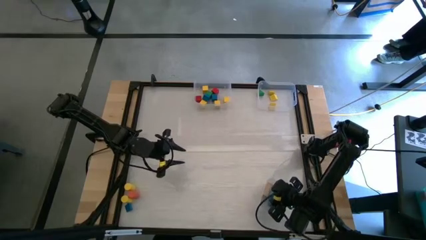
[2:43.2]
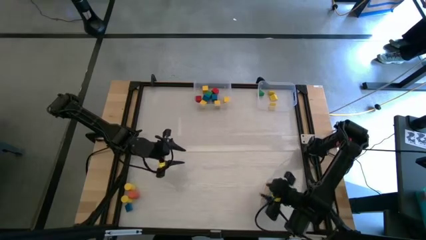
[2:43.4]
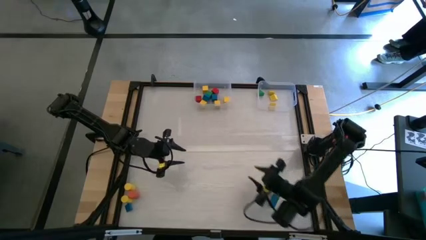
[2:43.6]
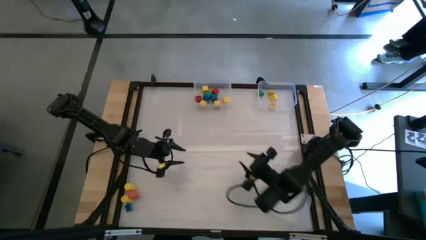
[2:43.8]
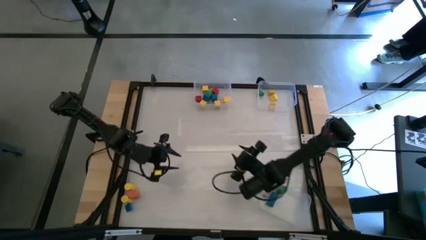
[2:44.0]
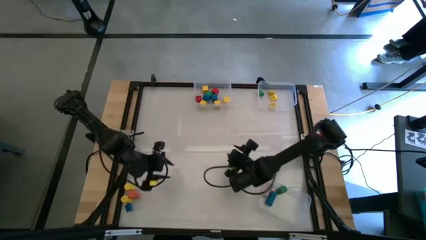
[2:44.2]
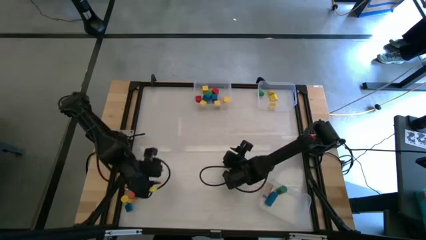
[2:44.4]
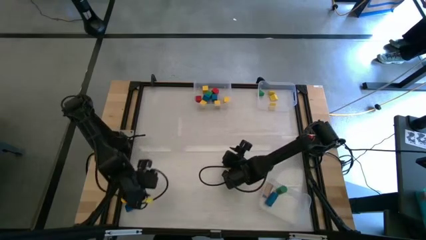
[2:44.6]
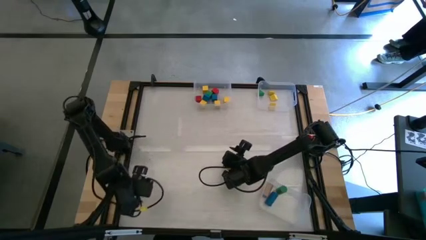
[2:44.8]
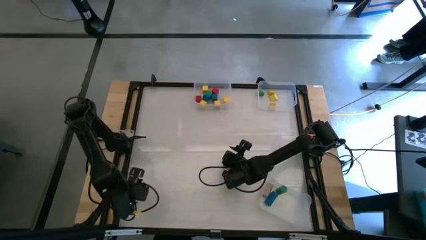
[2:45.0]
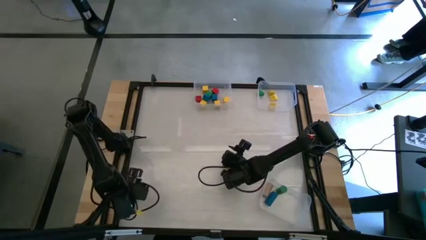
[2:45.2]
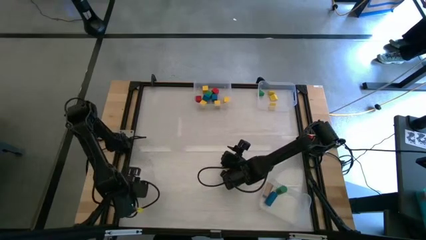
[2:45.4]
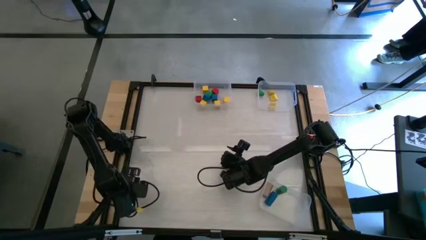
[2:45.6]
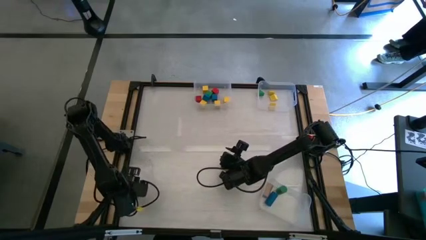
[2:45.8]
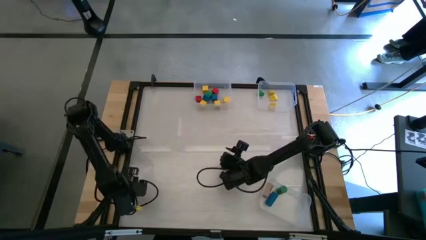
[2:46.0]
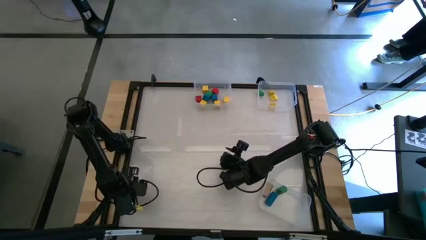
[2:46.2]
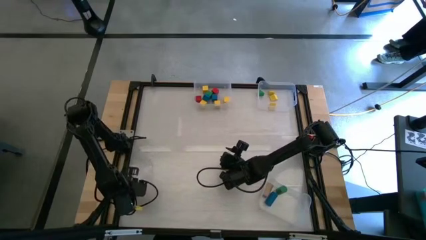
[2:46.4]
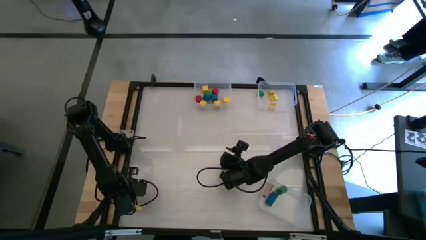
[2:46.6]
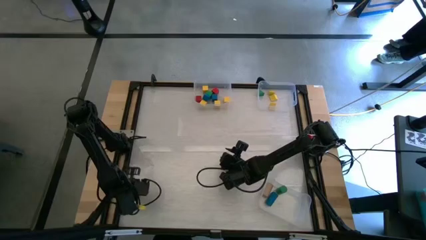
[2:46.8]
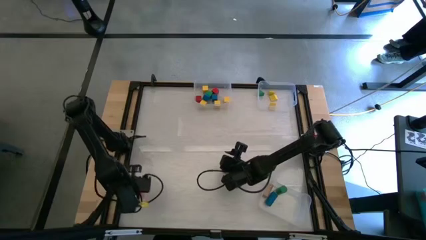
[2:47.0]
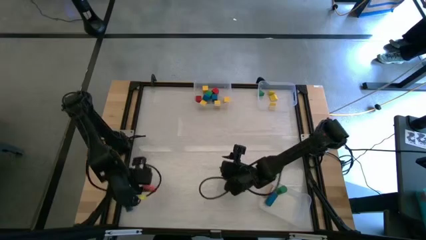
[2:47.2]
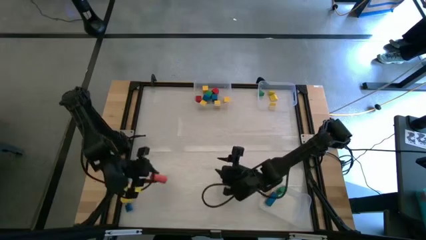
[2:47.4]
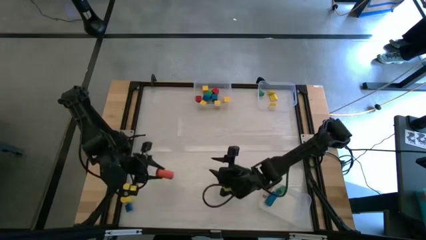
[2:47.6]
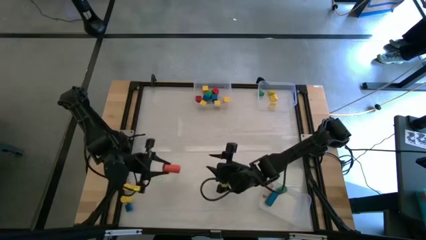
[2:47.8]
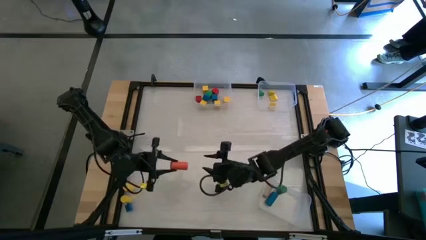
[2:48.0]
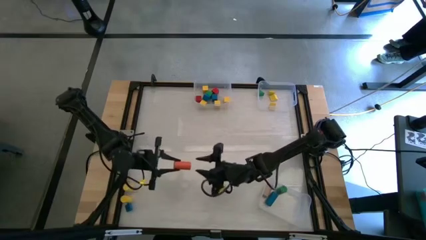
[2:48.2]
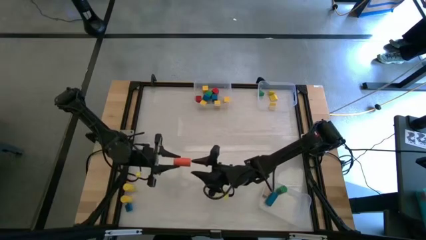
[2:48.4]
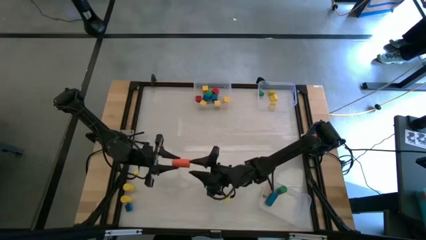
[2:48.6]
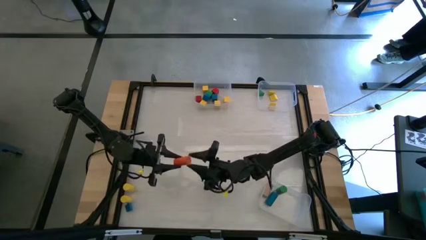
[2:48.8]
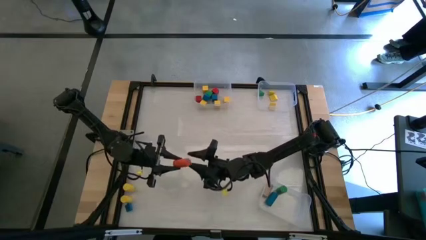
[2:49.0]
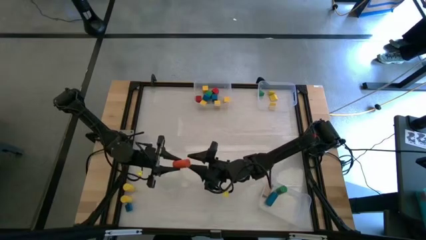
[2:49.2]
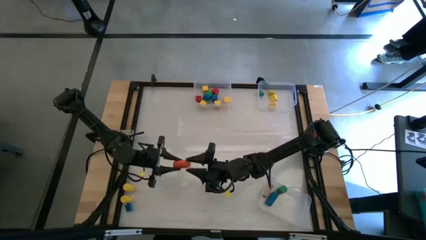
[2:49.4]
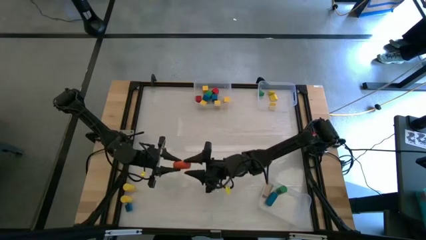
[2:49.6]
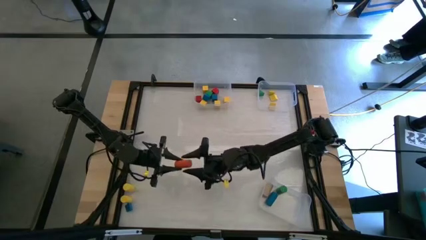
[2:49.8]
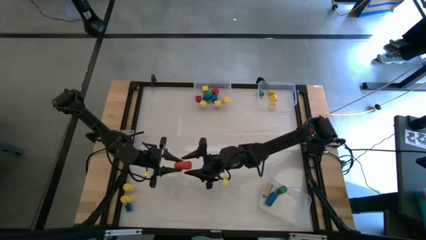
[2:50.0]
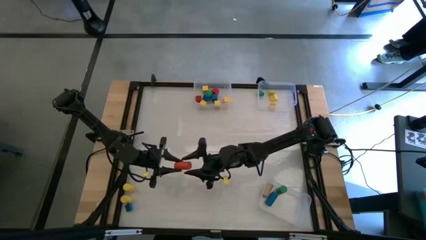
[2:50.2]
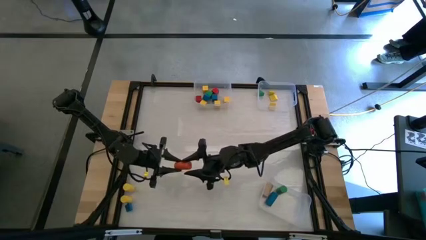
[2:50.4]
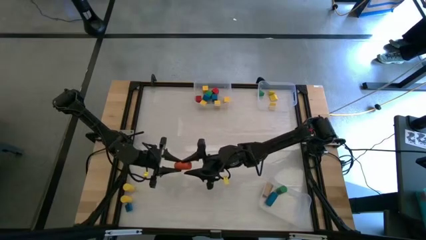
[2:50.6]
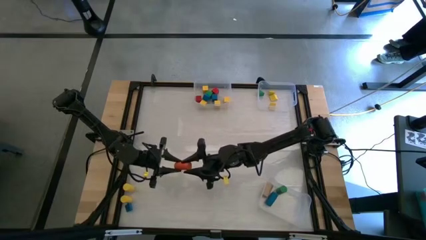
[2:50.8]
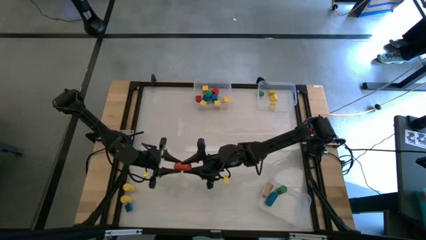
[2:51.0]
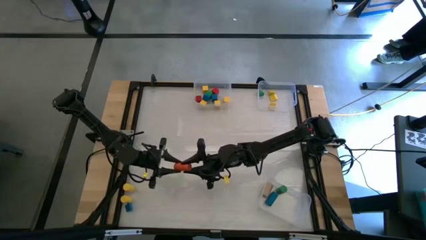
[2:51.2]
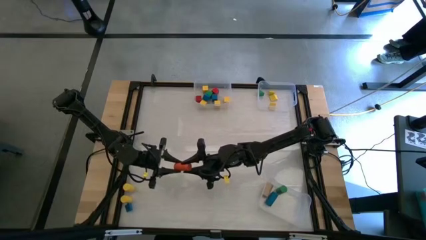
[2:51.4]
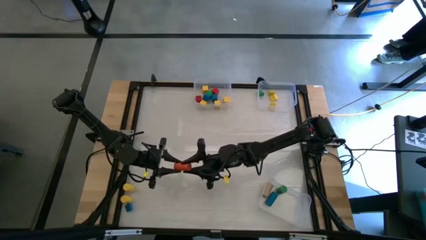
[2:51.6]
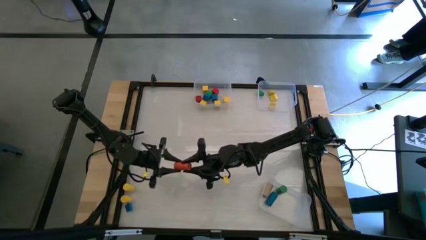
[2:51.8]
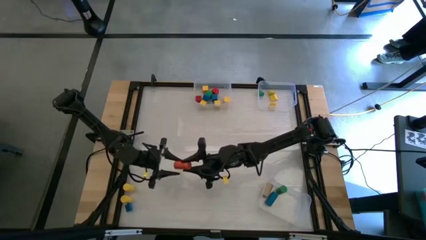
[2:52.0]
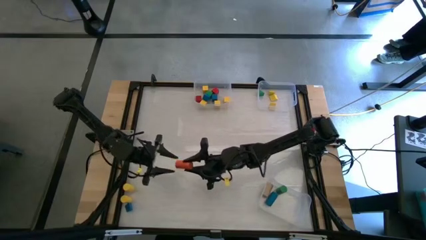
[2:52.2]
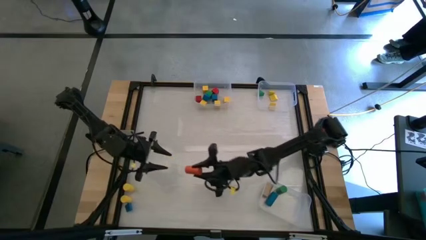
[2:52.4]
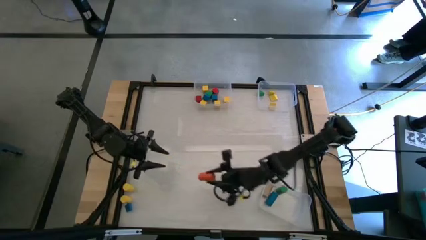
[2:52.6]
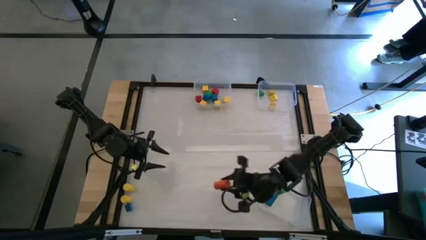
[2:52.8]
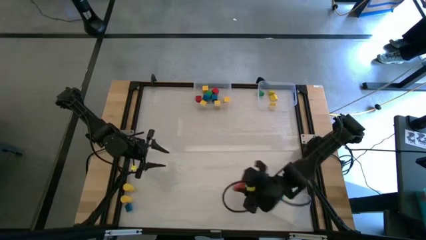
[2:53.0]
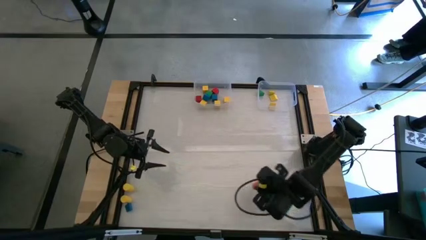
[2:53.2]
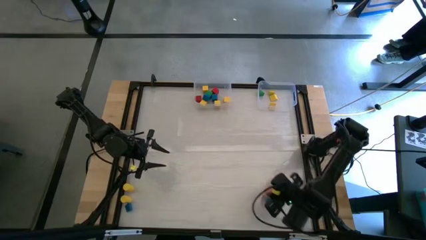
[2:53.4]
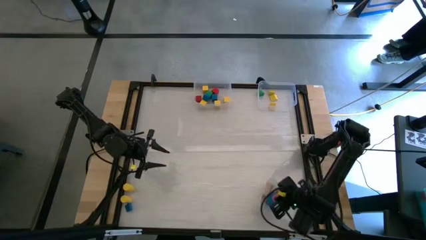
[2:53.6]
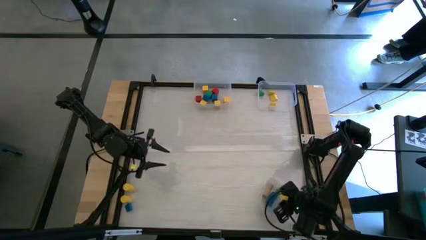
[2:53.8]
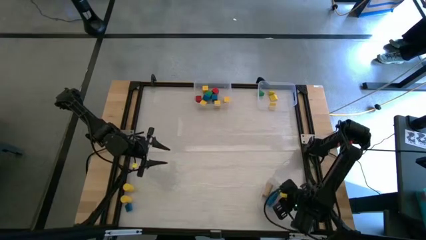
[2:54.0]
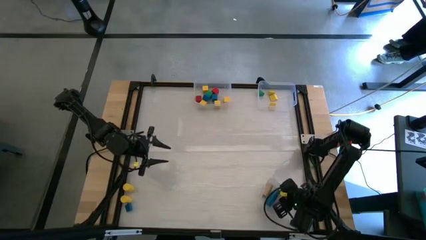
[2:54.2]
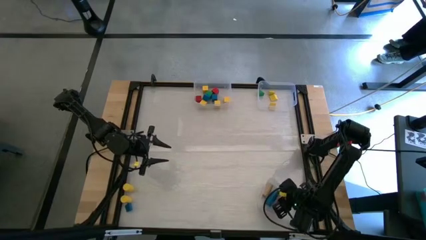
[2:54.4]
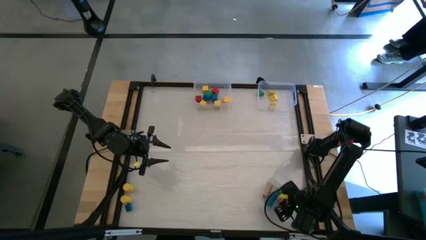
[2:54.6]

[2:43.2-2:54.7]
Task: Sort blocks by size
Put the cylinder orange block into the bottom right transparent bin

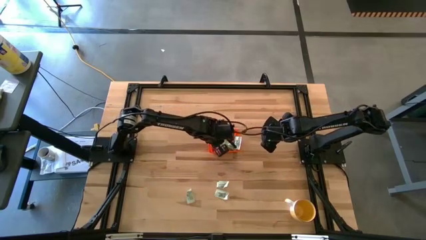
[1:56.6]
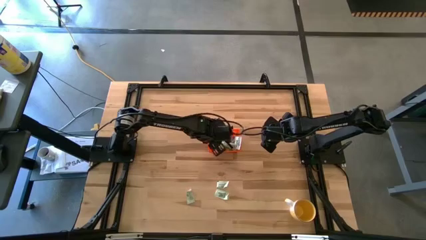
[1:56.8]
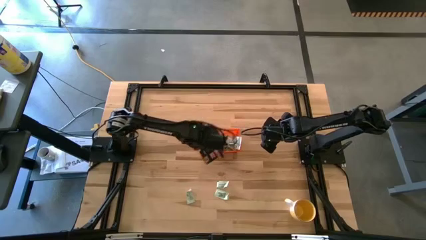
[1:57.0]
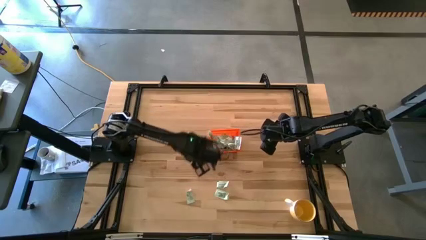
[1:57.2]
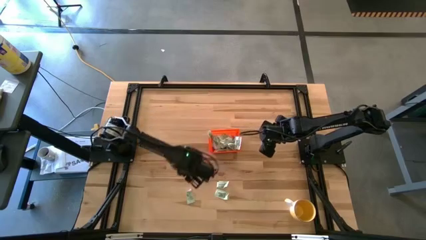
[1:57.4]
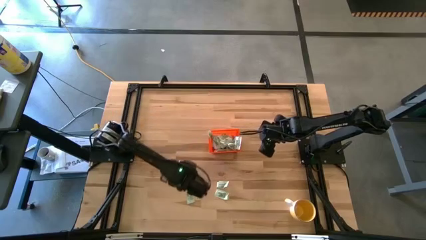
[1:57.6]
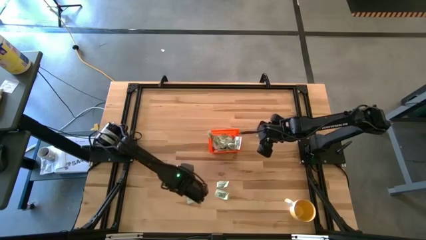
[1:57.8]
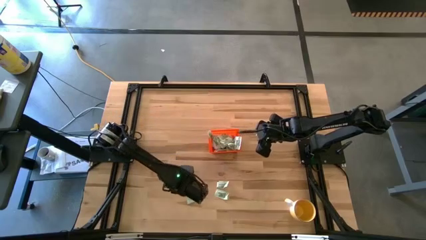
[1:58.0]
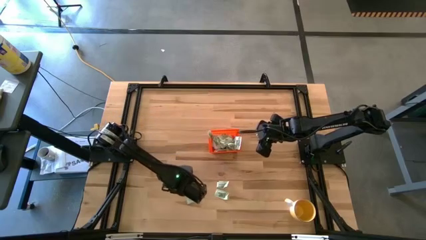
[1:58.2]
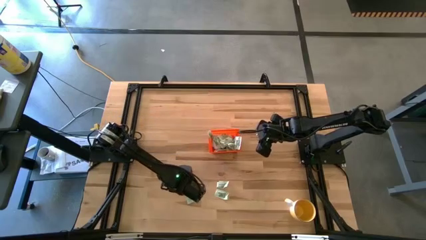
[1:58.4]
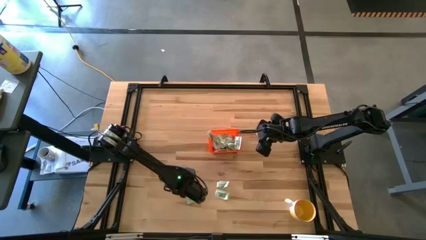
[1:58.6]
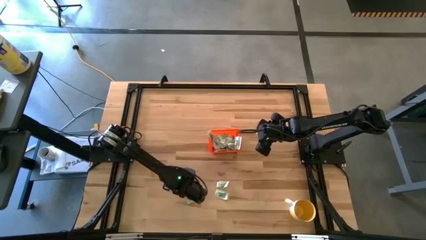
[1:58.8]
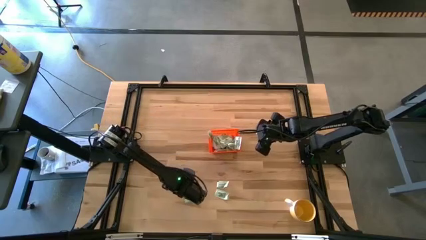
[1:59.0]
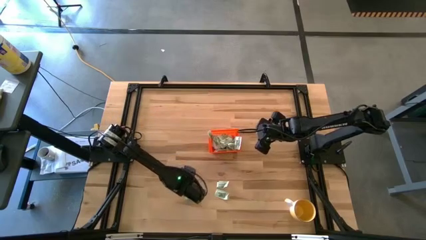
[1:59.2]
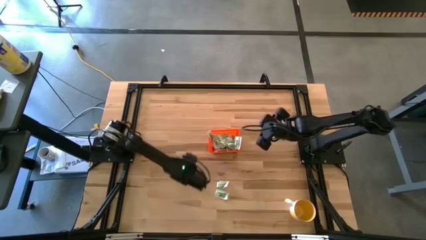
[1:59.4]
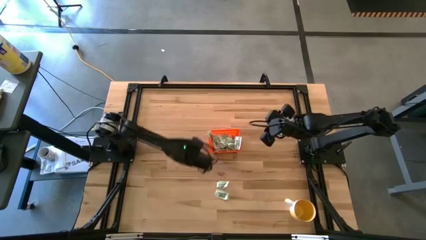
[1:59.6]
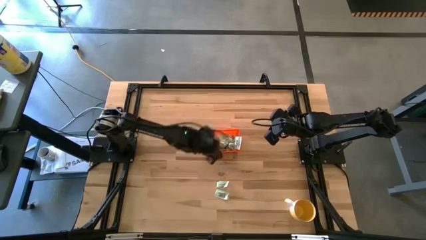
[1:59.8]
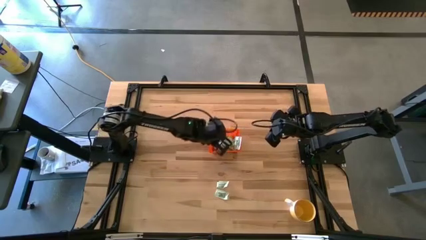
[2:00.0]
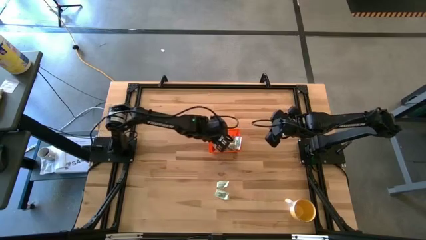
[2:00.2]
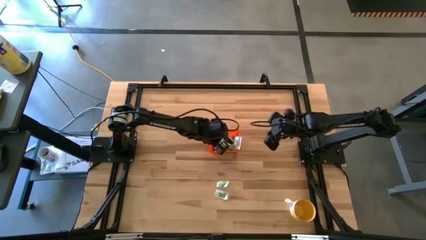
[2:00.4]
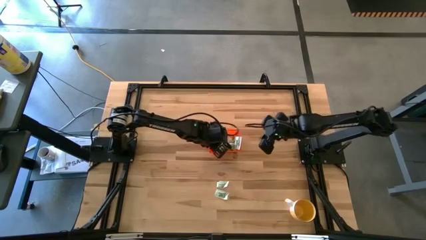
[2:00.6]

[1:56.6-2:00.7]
Task: Pick and place Stevia / Truvia into bins
Put the light green stevia packet into the orange basket

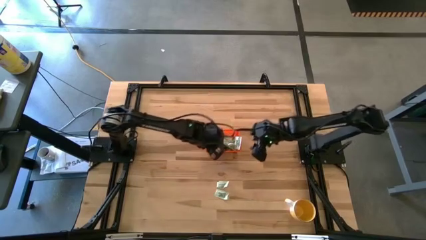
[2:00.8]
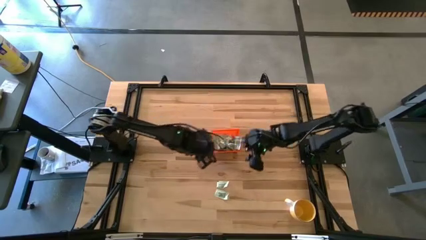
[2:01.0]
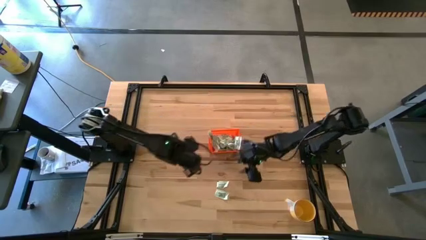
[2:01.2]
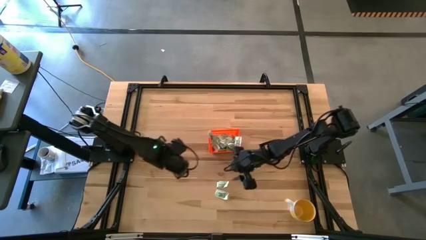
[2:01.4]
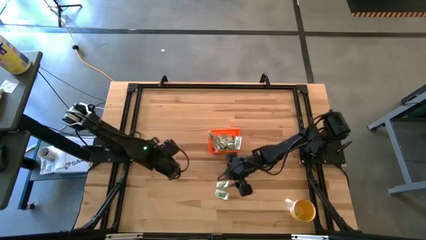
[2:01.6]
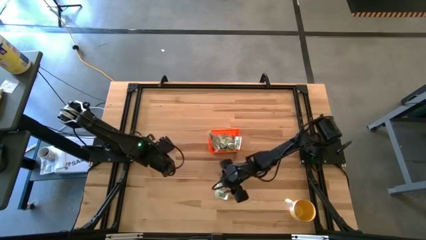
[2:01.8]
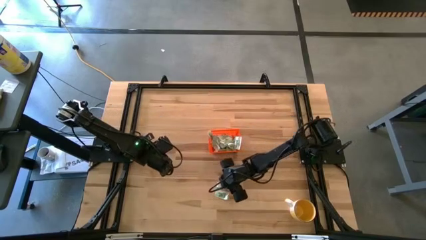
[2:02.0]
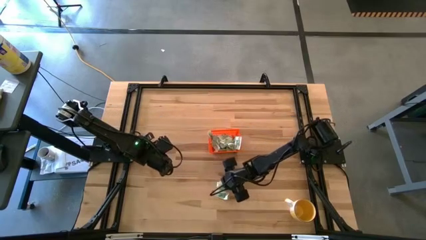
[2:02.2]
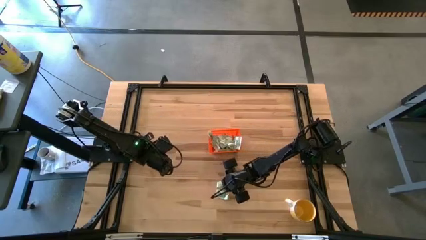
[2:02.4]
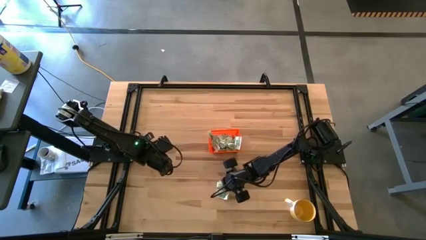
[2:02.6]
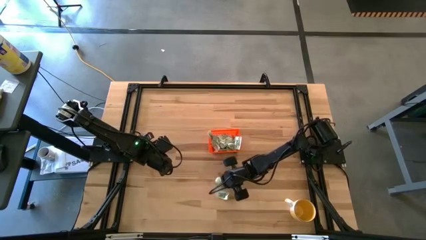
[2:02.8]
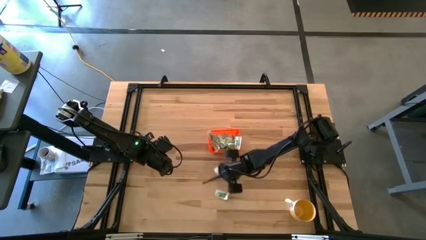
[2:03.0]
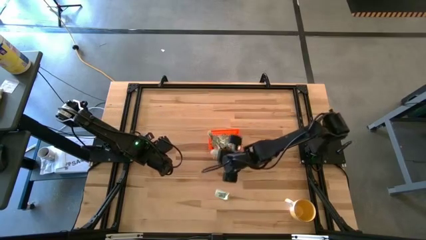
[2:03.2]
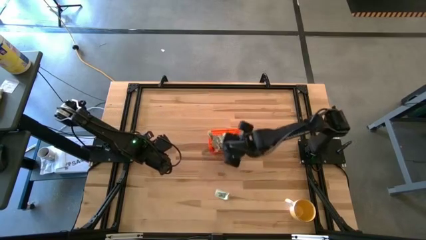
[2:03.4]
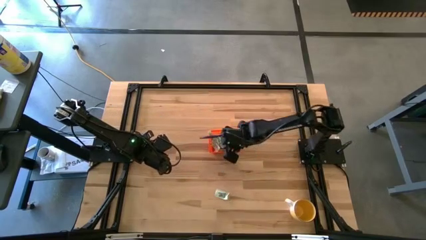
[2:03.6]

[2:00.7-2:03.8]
Put the light green stevia packet into the orange basket
